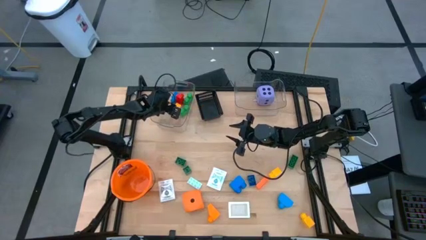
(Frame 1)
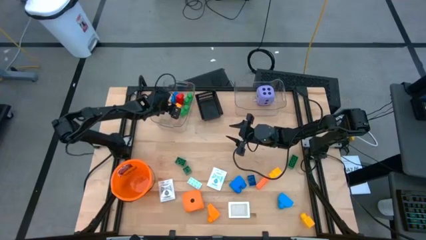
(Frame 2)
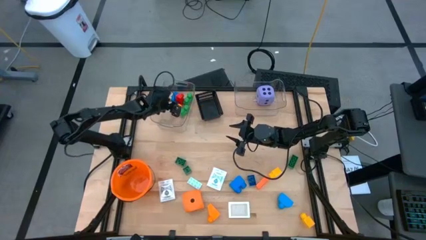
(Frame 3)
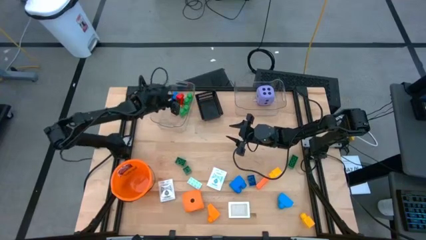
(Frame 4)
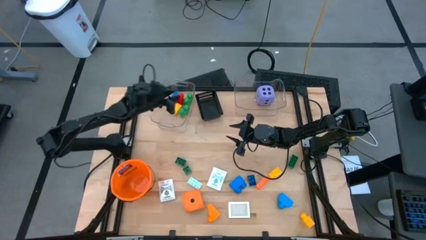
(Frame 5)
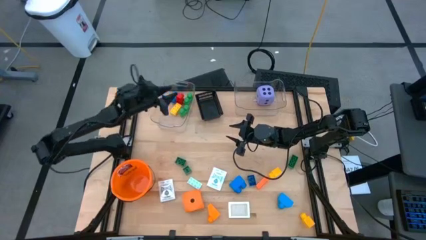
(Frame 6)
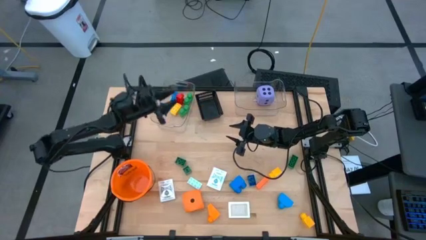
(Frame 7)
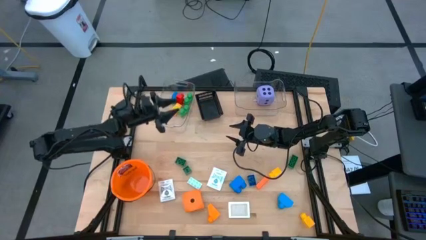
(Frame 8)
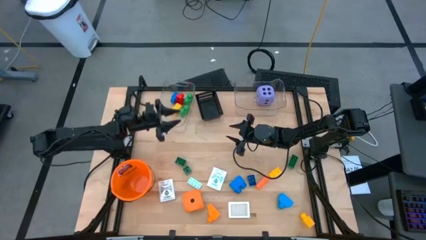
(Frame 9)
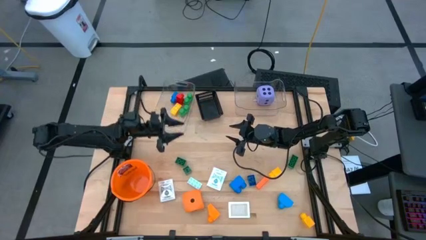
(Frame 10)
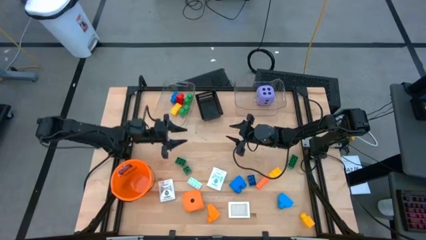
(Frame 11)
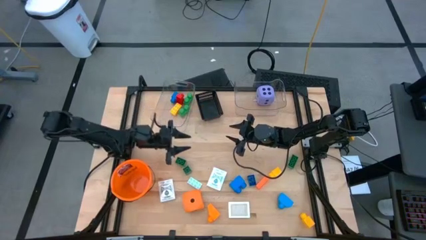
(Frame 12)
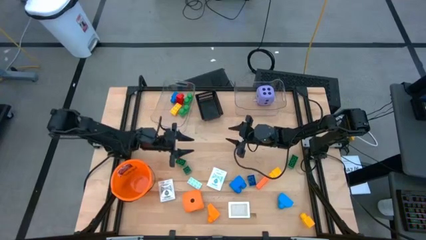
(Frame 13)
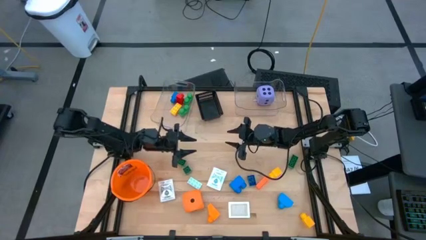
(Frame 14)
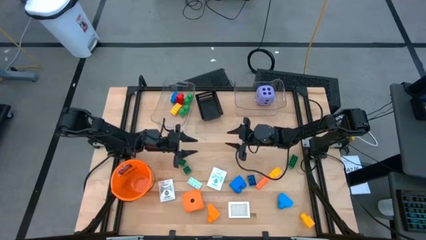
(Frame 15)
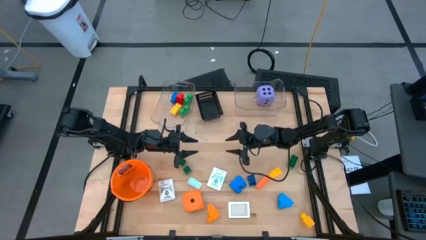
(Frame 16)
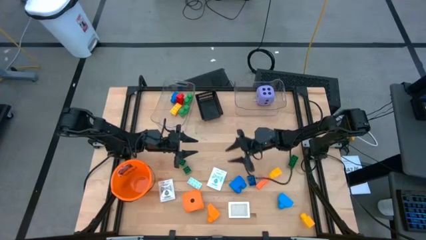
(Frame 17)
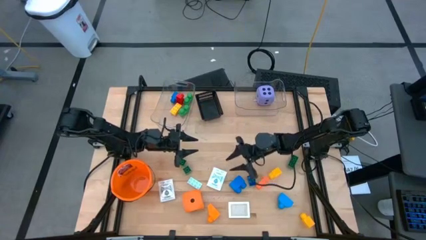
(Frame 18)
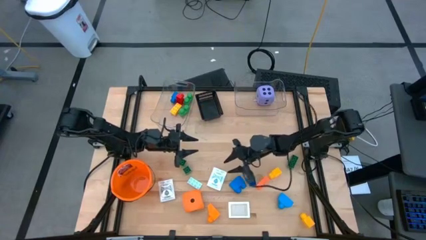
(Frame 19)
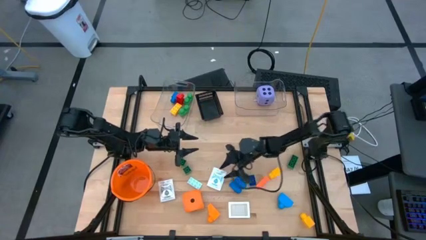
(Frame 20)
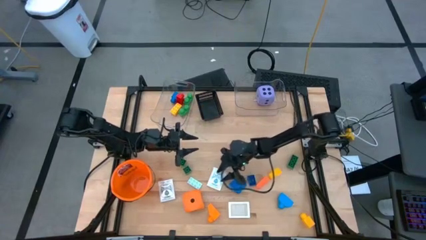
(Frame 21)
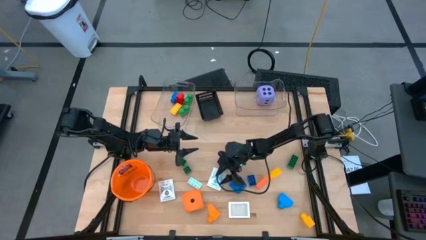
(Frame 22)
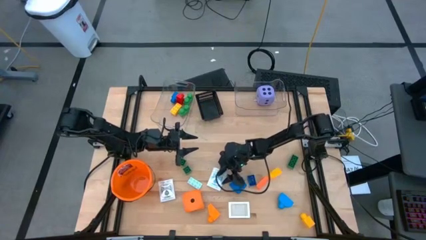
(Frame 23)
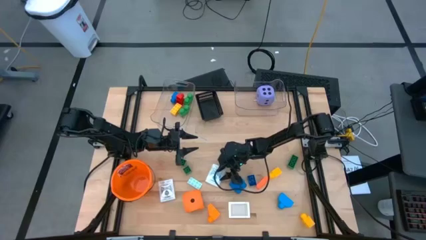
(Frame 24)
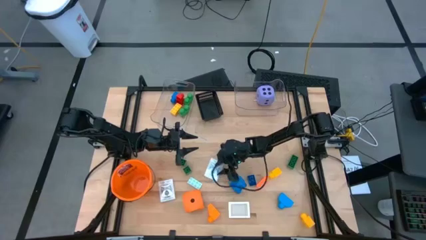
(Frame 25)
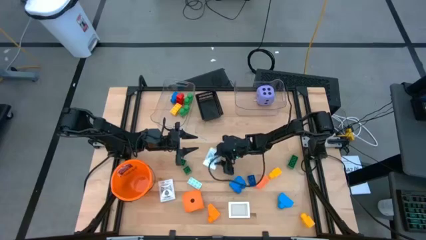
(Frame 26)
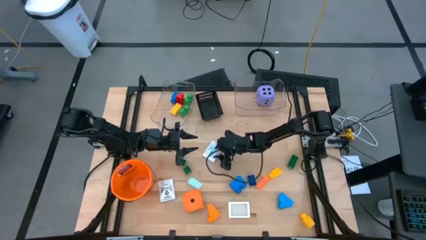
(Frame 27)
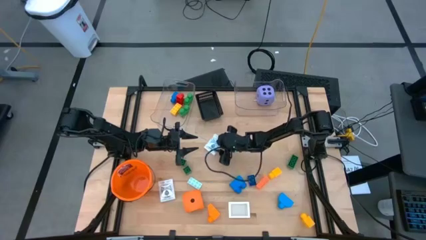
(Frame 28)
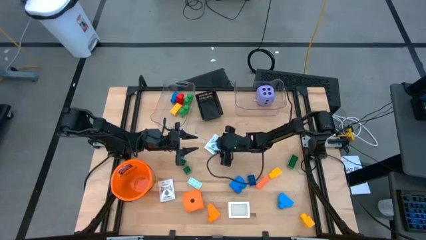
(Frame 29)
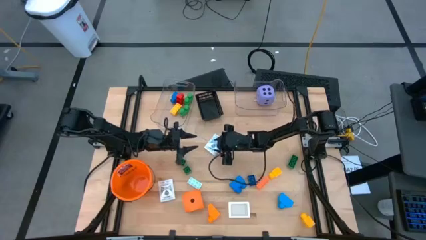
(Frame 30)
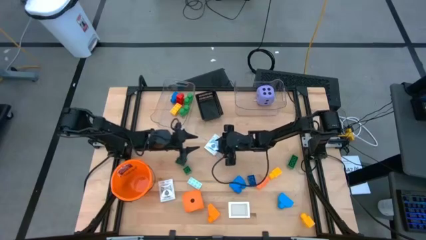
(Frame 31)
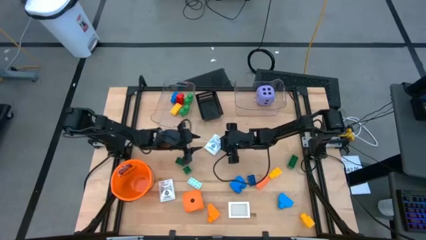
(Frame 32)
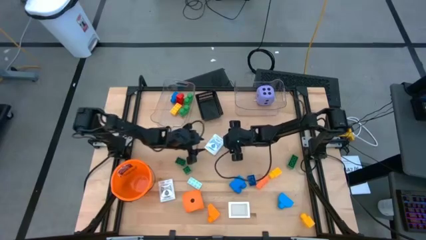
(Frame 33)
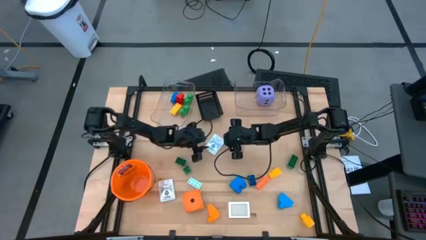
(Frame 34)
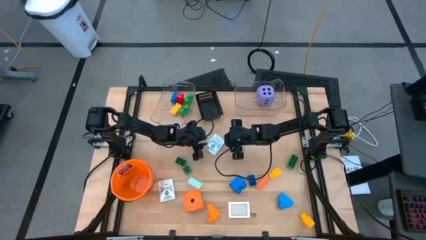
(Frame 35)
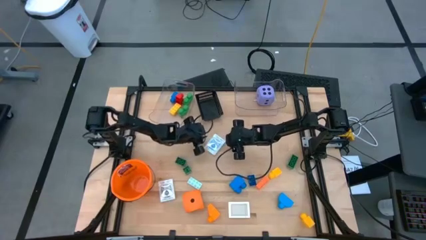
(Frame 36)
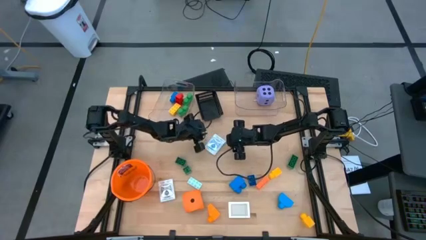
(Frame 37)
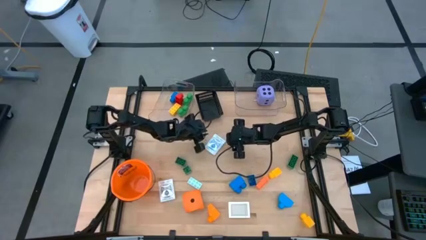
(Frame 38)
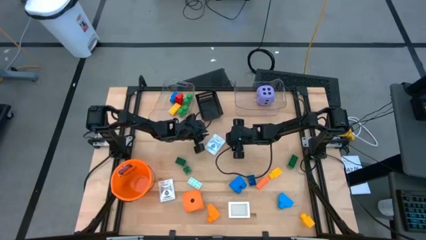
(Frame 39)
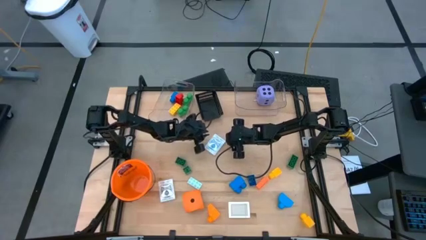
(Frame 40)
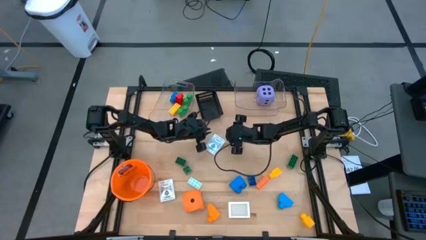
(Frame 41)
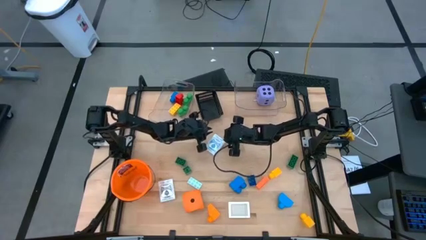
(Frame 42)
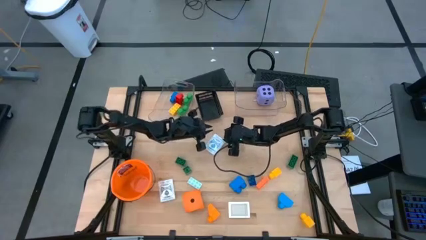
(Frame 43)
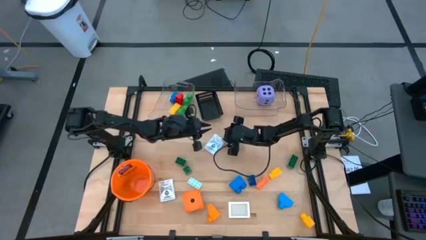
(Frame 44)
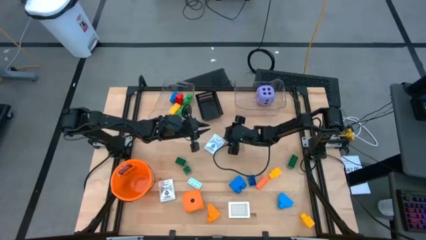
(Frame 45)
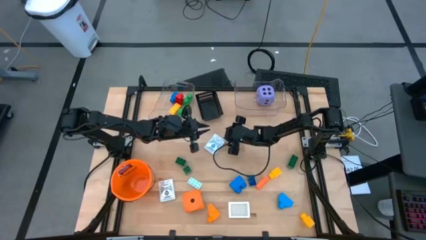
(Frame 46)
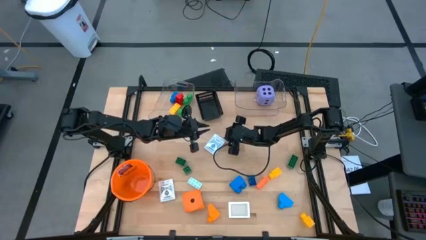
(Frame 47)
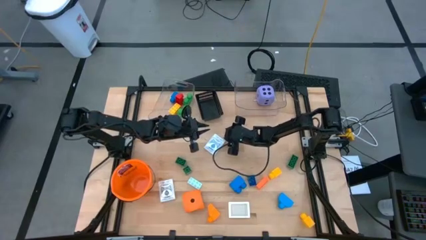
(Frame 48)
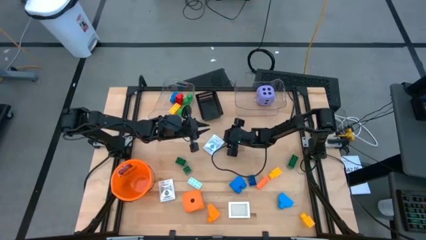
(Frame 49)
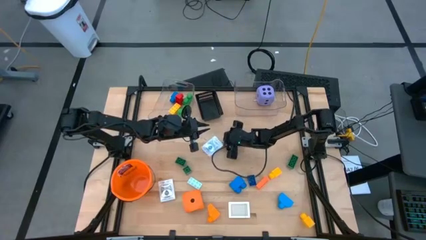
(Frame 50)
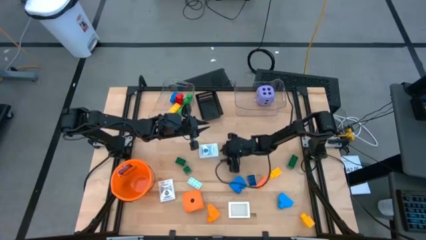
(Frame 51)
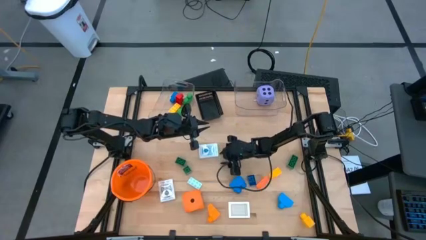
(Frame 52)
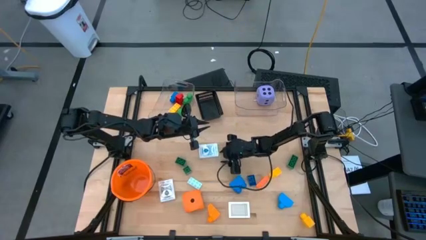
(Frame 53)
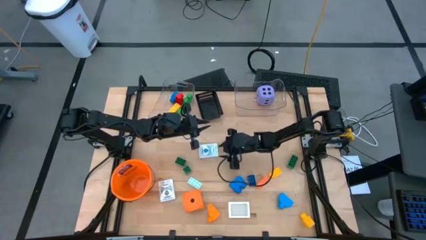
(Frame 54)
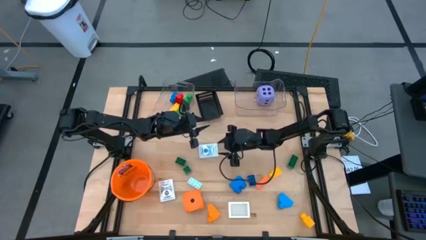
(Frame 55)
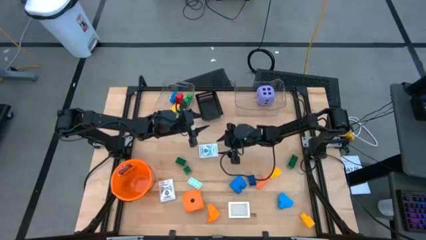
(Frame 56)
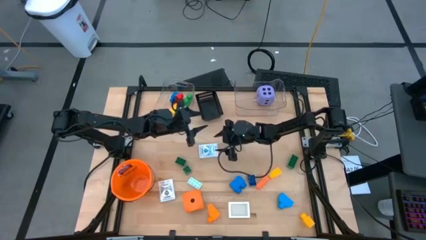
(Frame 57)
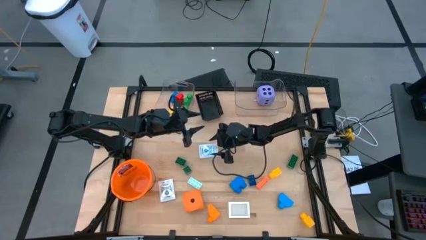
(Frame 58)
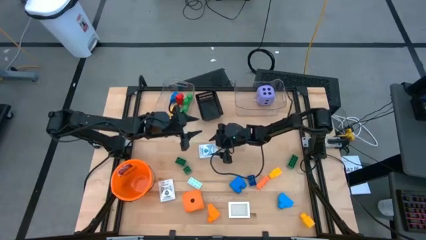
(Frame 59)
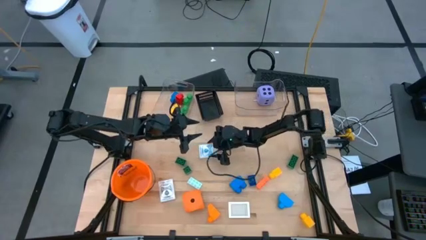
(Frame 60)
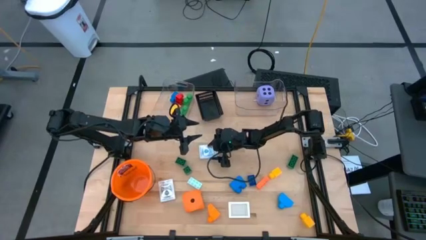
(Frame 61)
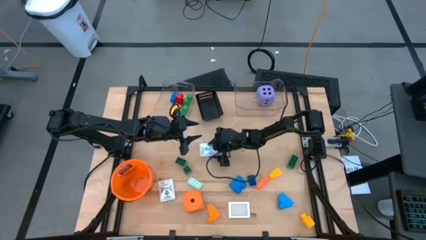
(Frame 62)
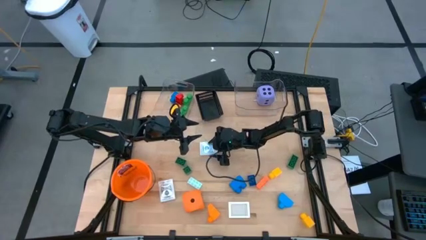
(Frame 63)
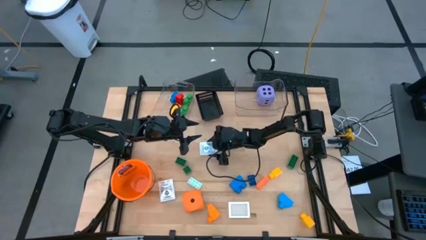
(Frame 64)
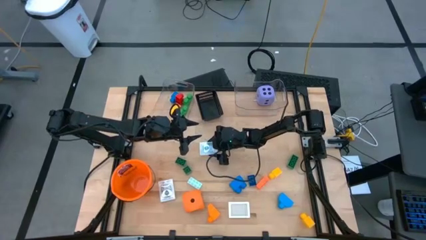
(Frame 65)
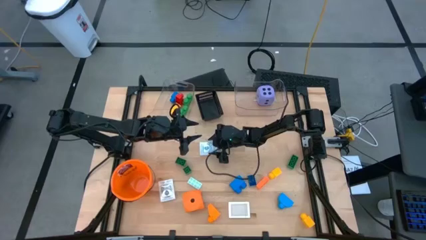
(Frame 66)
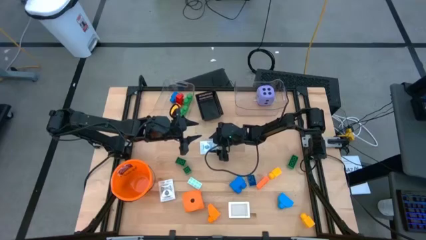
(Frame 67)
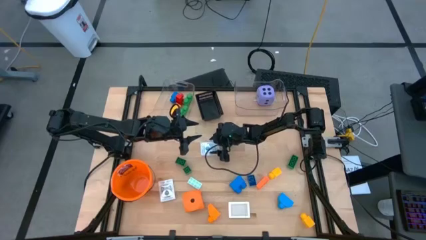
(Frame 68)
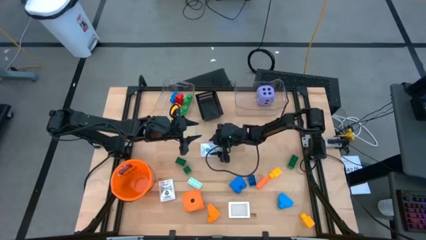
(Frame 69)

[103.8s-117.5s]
Task: Pick & Place Toys
Put the blue deck of cards into the black basket
